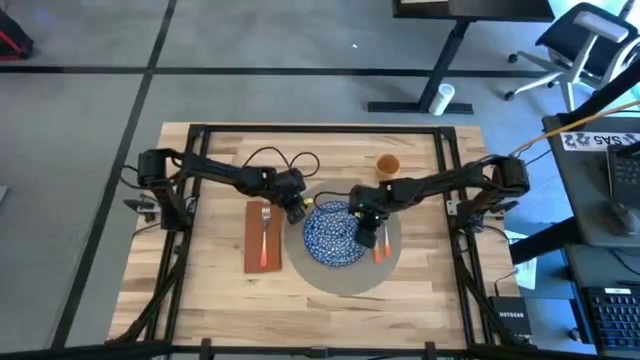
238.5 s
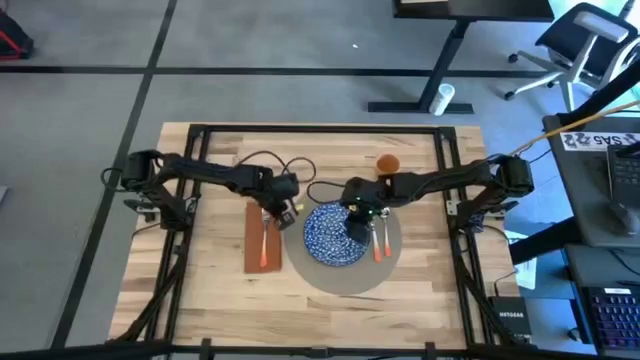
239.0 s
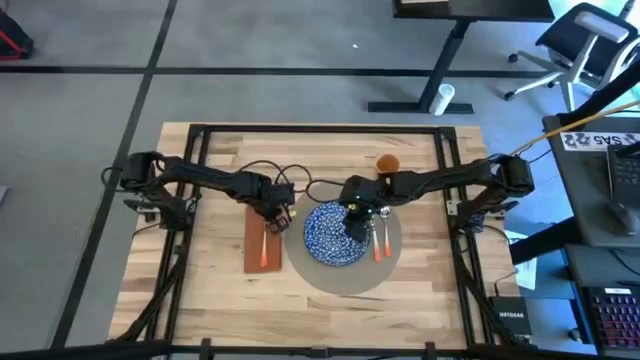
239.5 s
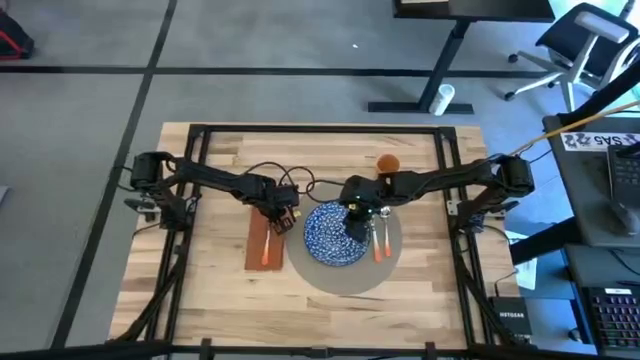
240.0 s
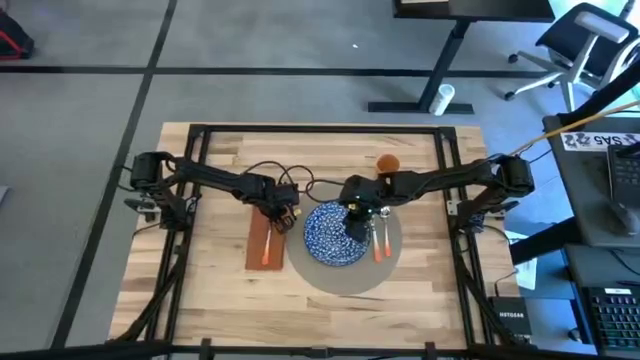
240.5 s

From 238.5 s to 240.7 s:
Task: Set table place
Adjust the orange napkin

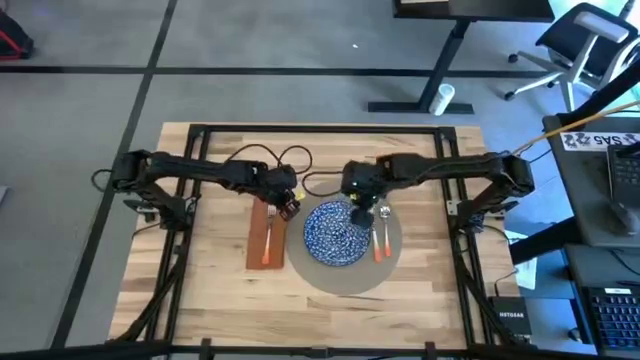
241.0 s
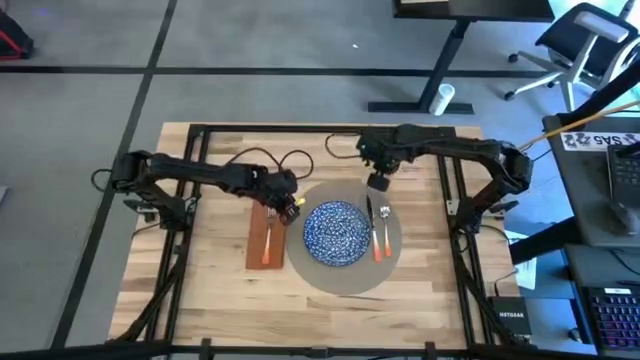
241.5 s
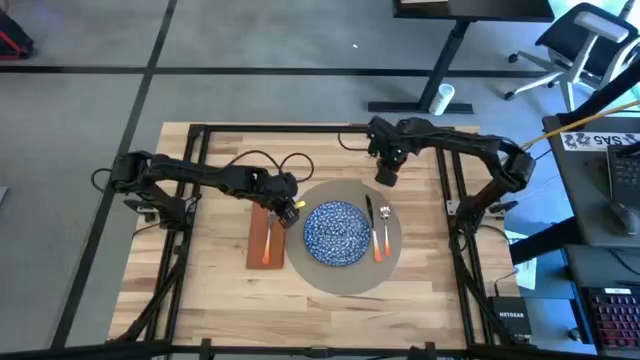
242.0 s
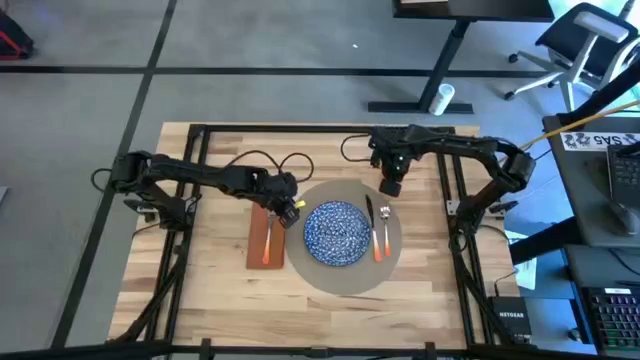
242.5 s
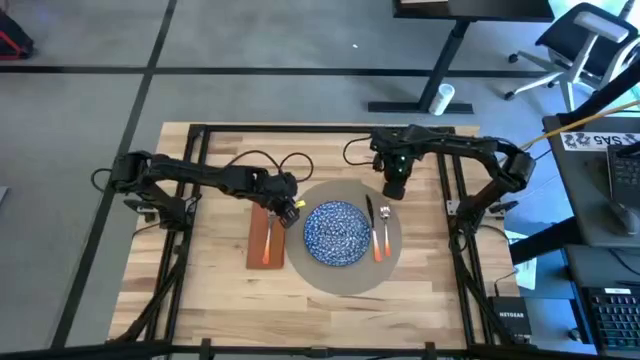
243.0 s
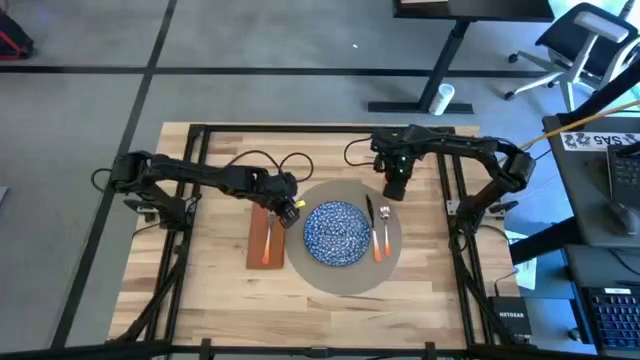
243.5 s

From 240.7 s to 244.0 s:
Adjust the yellow cup

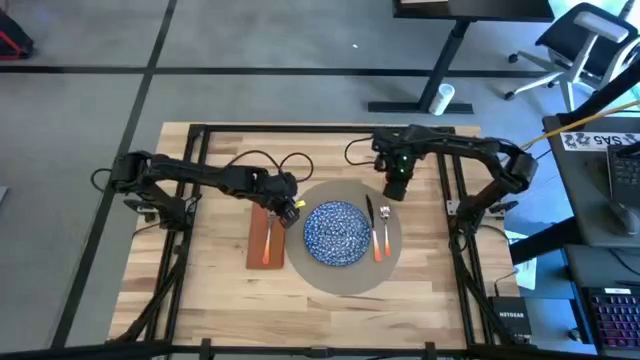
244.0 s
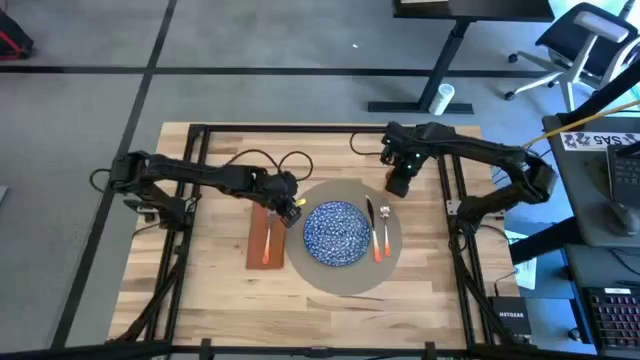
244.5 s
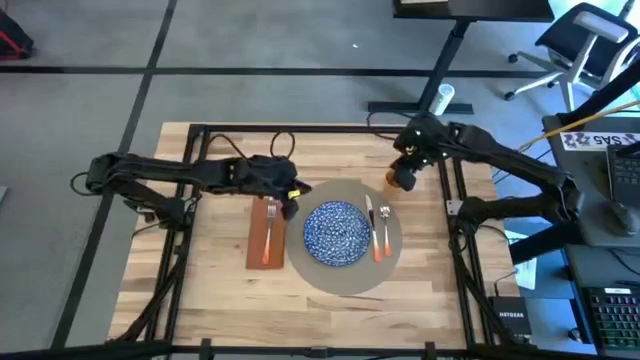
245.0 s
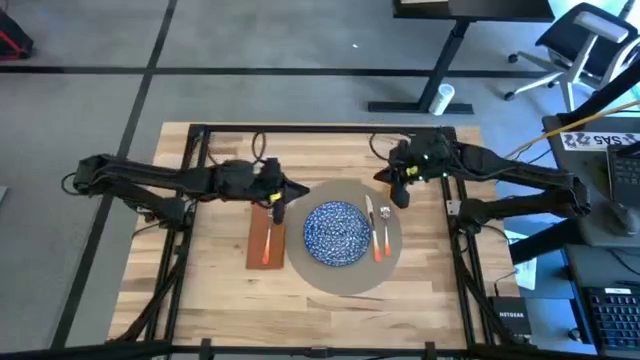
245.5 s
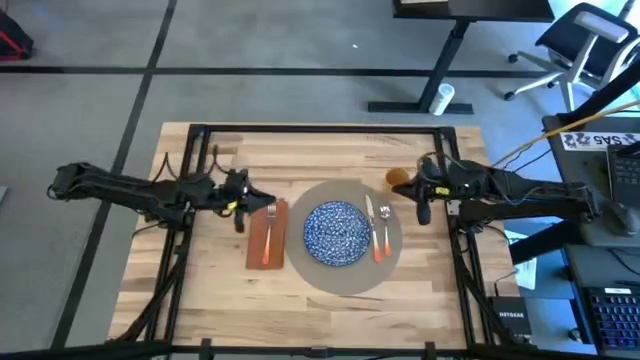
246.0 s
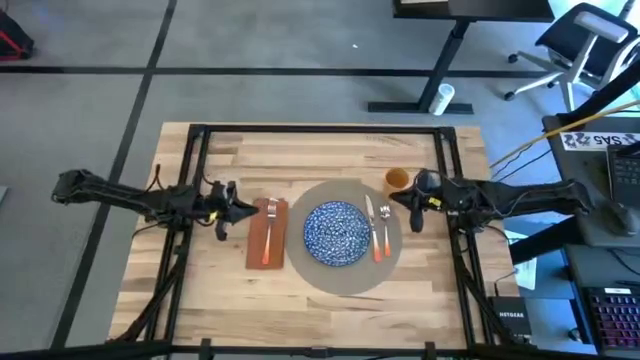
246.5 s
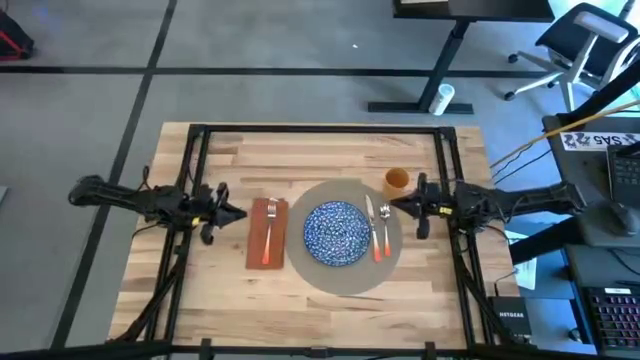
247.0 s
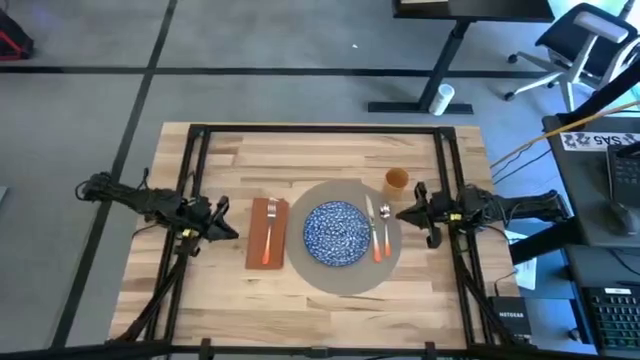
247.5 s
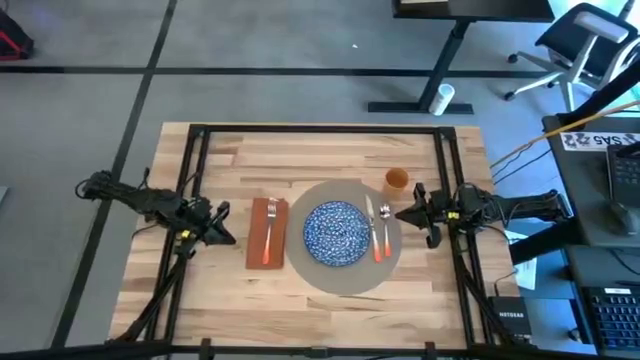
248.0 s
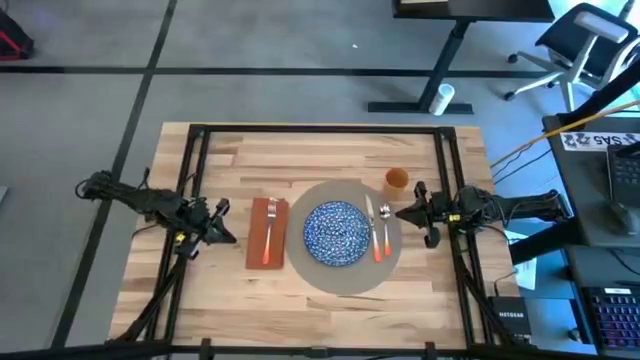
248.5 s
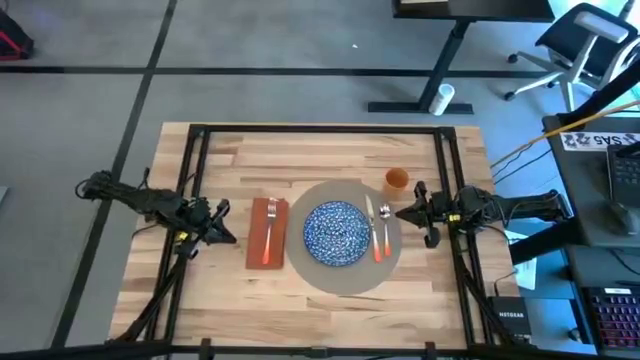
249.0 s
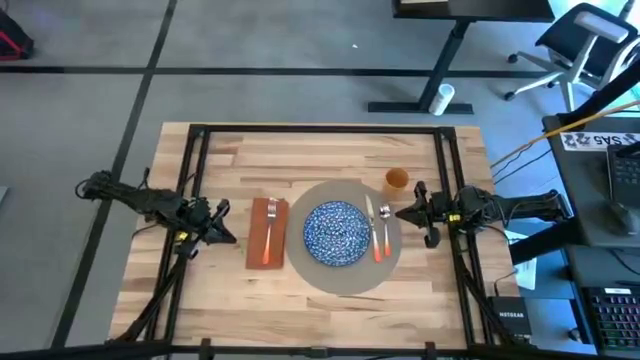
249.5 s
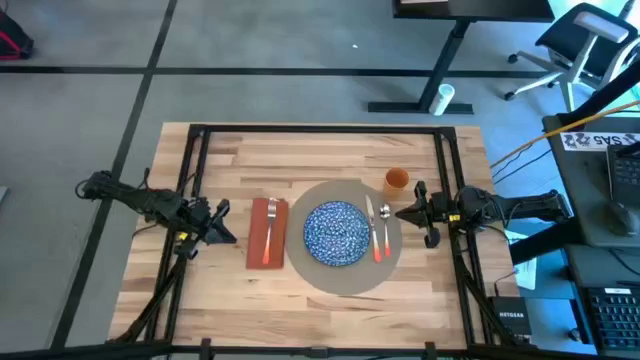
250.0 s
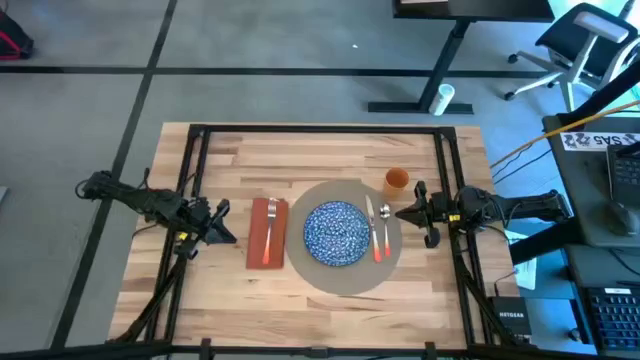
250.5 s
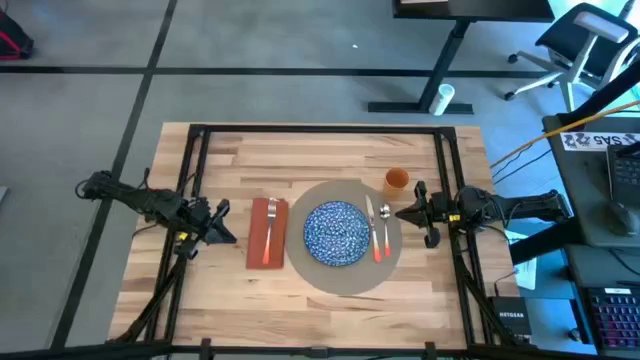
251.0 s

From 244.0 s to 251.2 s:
Return to Home Position

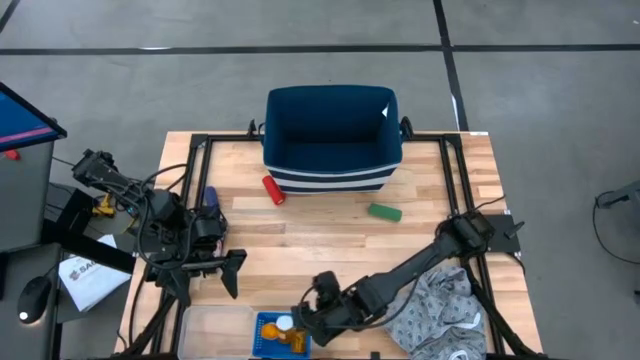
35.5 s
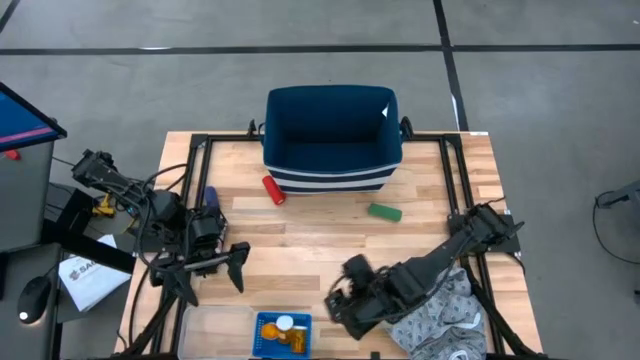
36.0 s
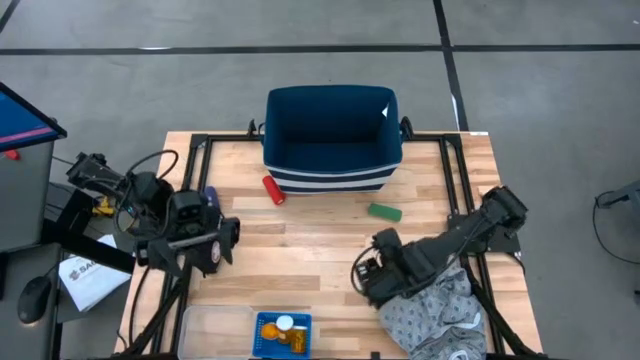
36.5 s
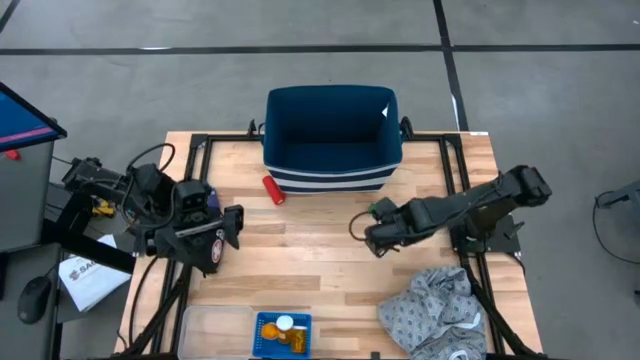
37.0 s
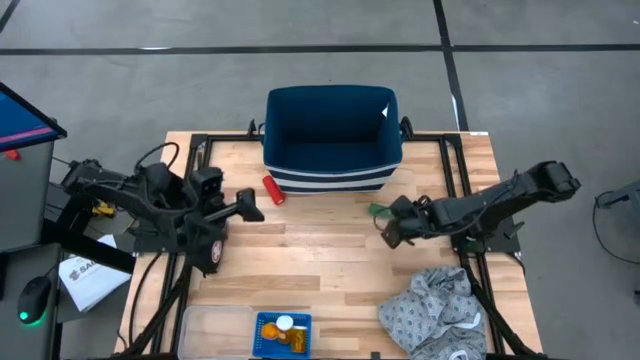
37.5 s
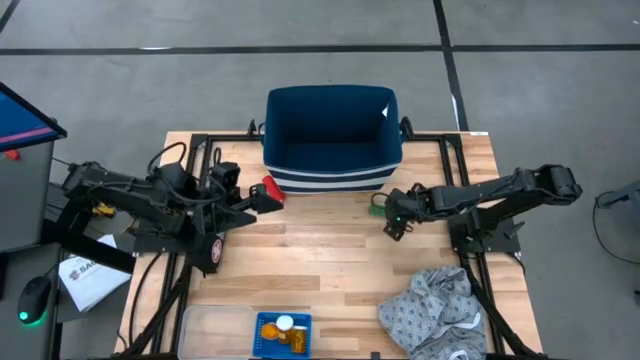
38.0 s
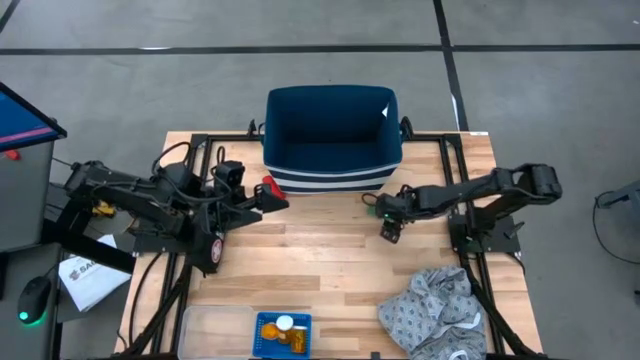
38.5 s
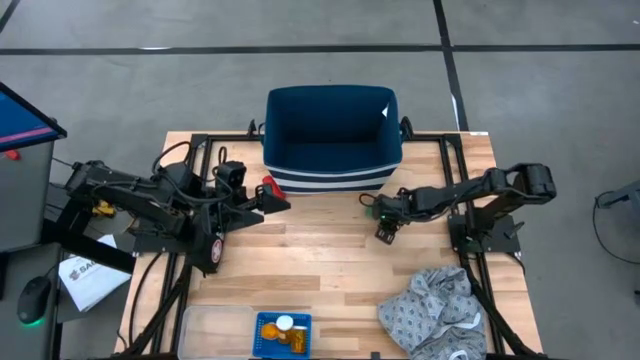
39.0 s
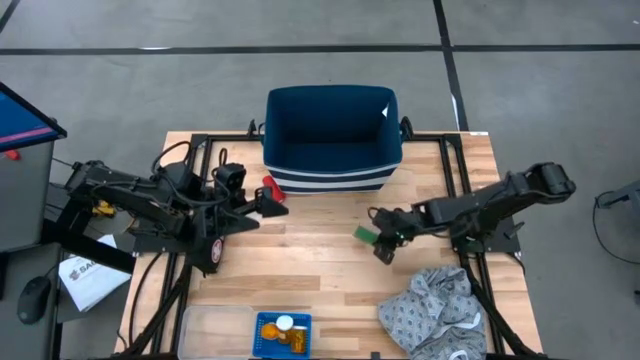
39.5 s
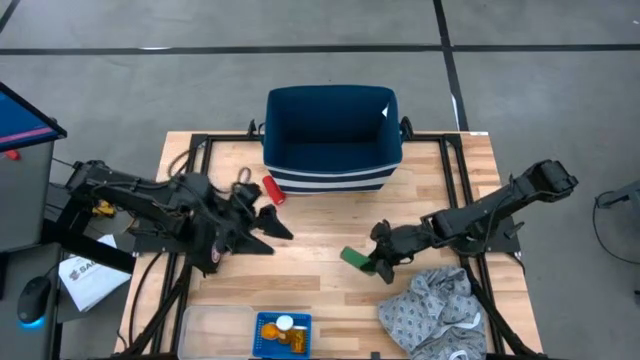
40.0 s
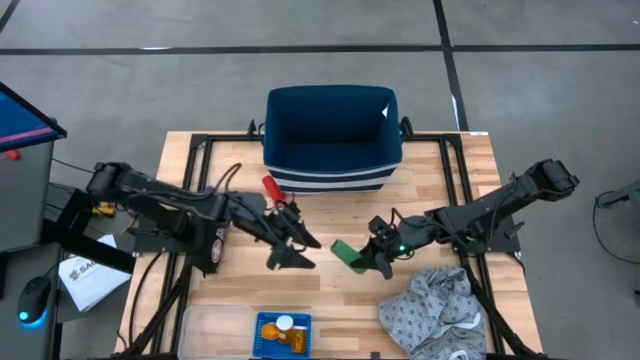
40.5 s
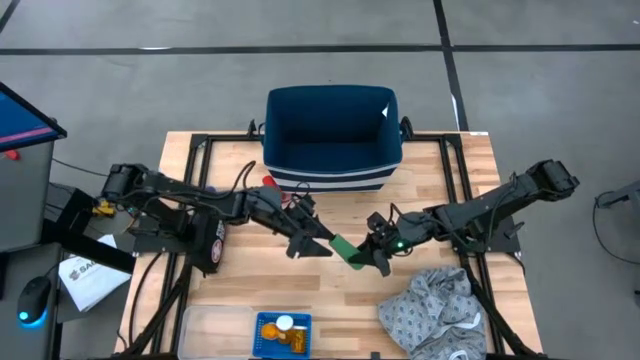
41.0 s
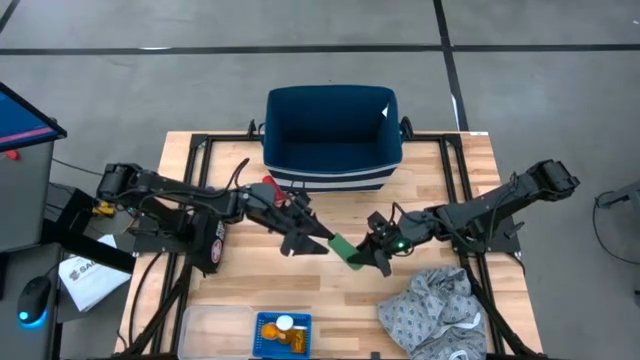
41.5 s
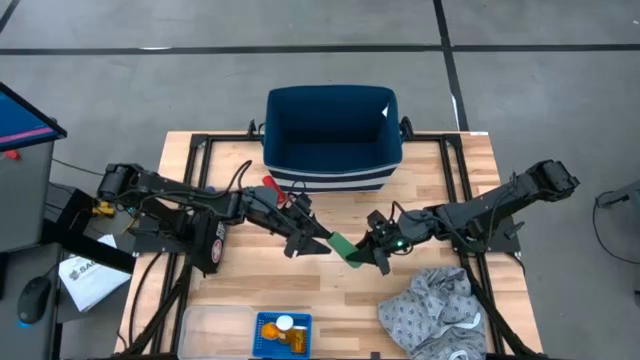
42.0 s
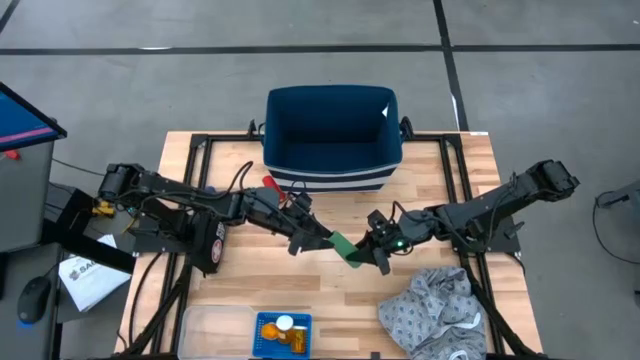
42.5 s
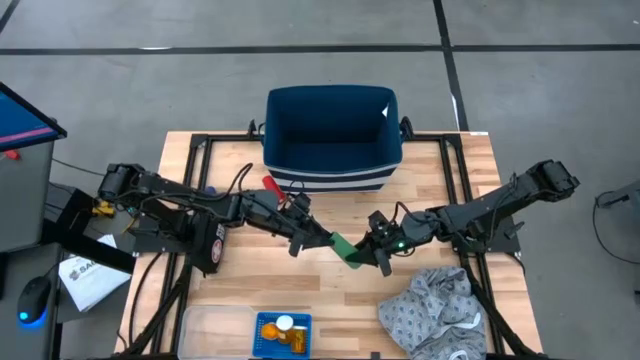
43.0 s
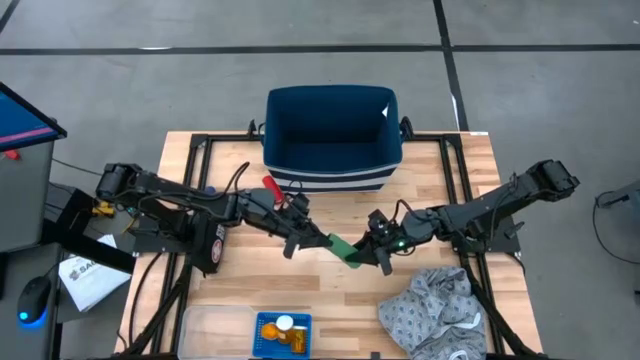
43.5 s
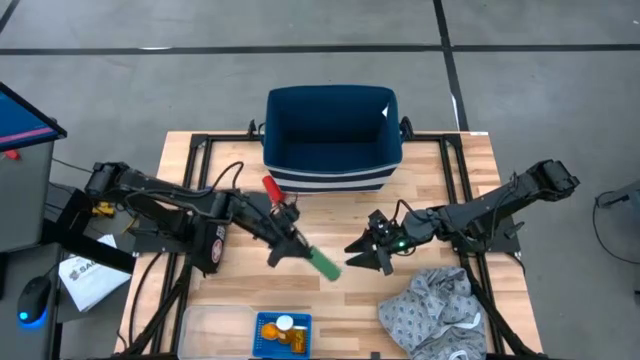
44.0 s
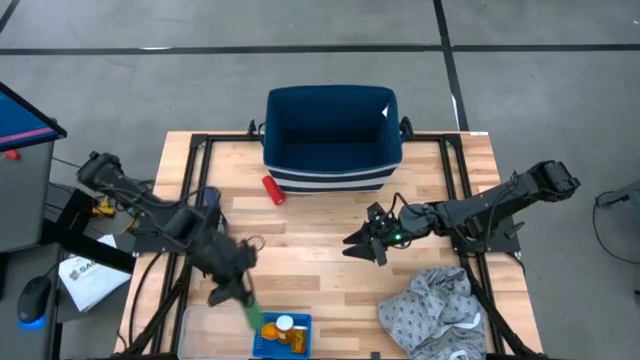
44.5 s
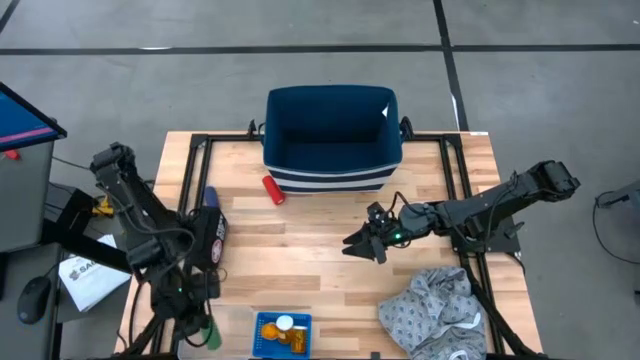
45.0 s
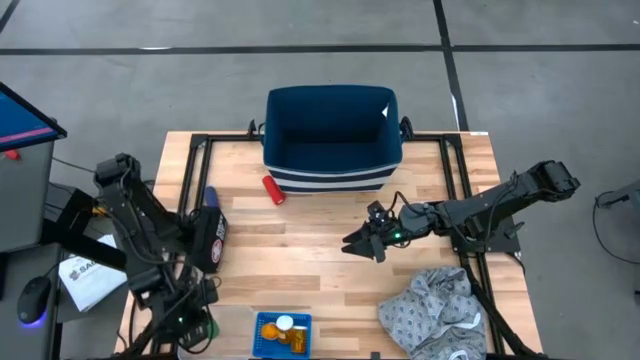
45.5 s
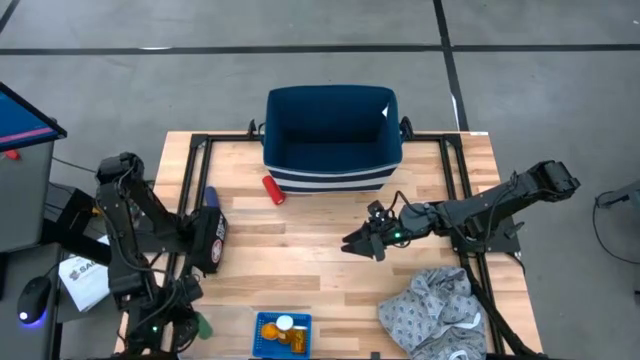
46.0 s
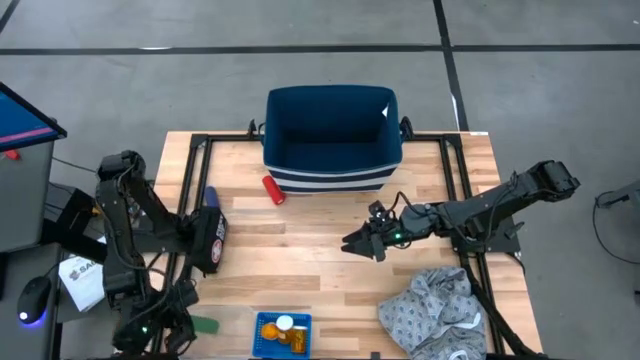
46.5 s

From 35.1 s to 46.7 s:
Task: Pick & place medical supplies in basket/bin
Put the green bandage into the transparent bin
